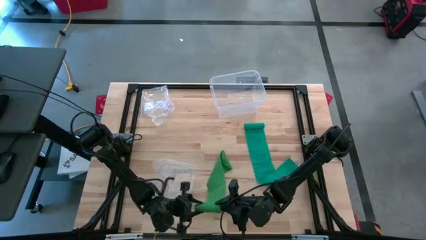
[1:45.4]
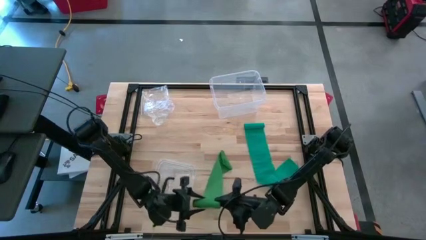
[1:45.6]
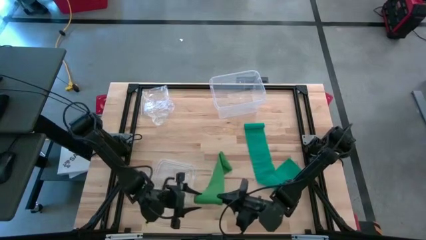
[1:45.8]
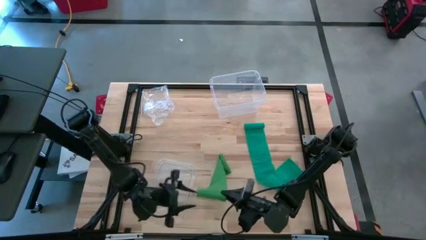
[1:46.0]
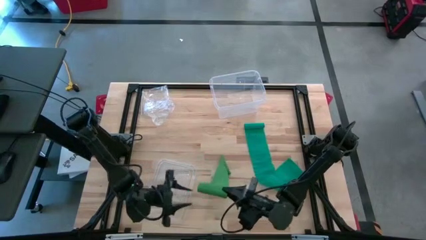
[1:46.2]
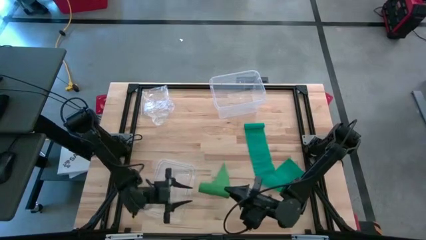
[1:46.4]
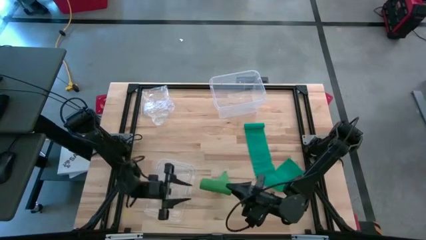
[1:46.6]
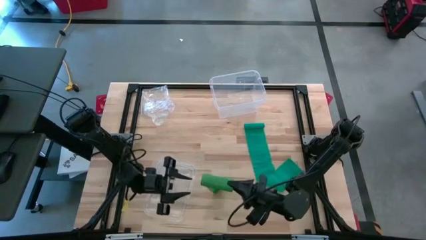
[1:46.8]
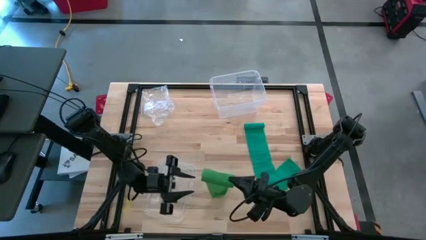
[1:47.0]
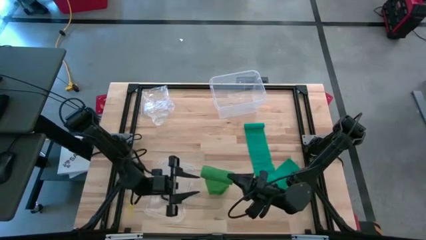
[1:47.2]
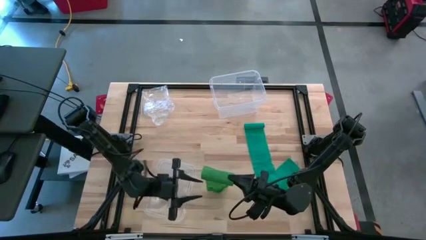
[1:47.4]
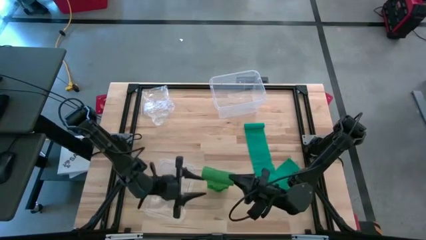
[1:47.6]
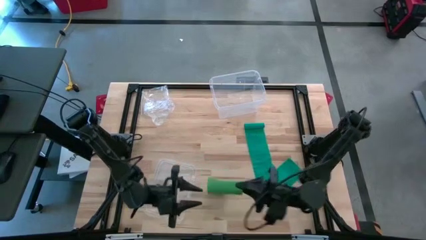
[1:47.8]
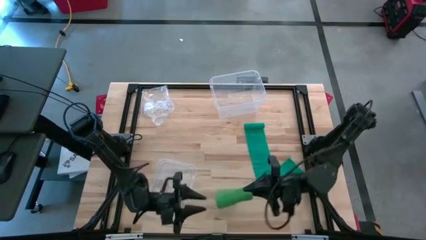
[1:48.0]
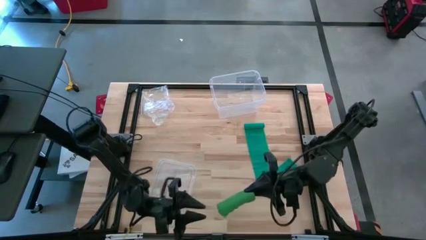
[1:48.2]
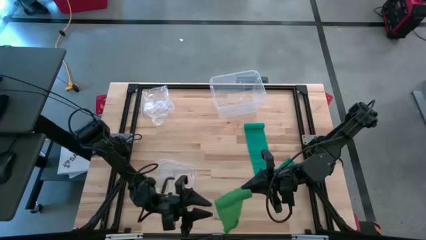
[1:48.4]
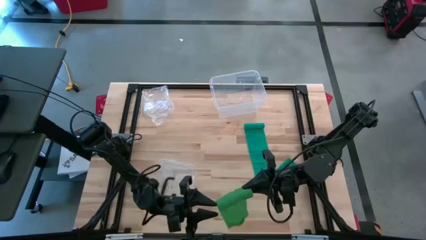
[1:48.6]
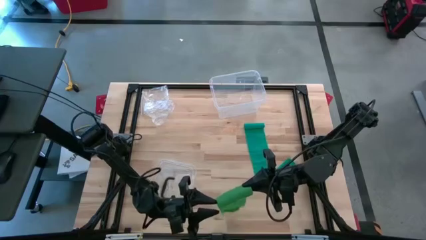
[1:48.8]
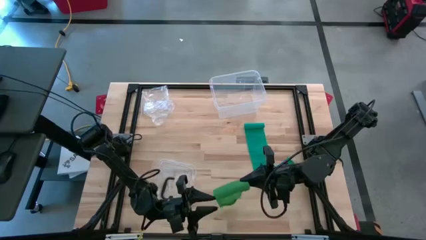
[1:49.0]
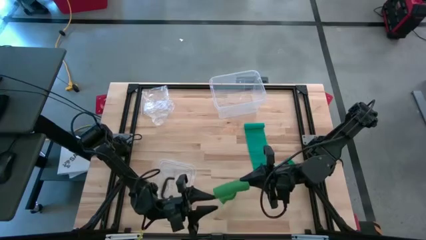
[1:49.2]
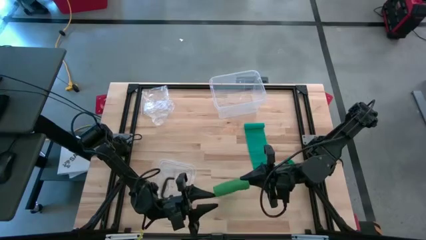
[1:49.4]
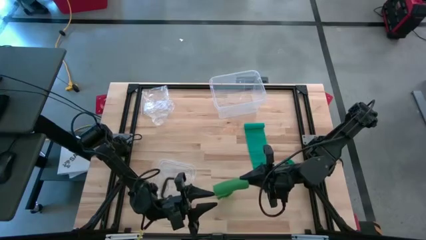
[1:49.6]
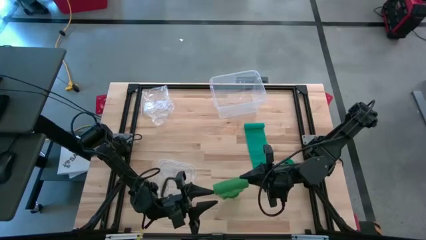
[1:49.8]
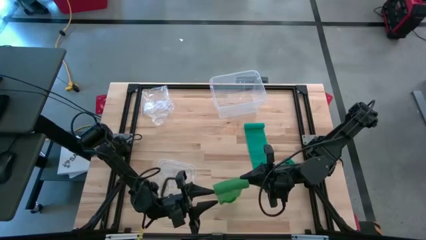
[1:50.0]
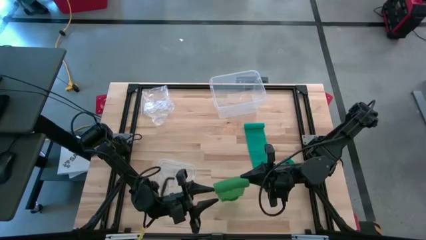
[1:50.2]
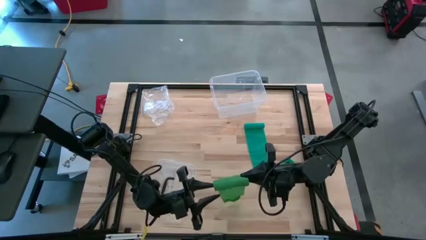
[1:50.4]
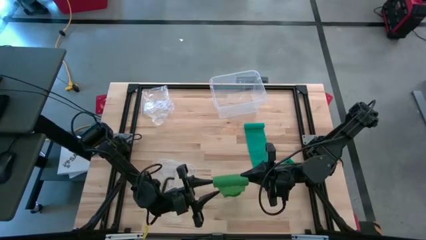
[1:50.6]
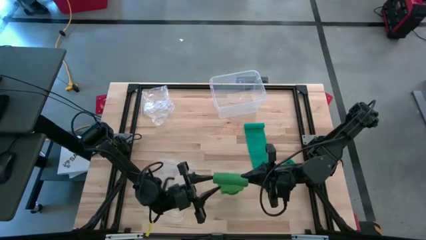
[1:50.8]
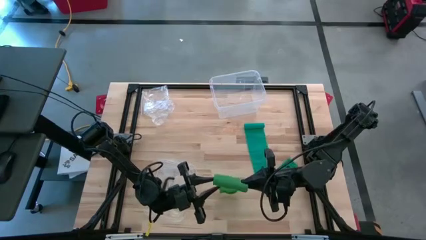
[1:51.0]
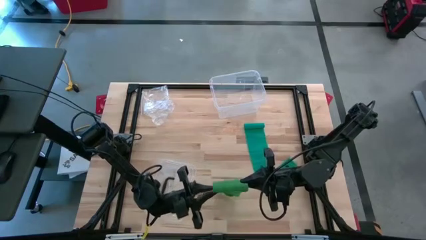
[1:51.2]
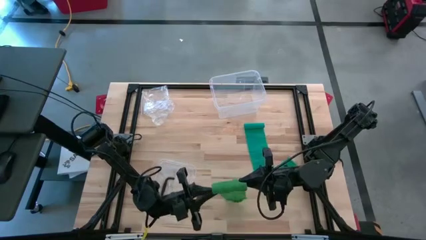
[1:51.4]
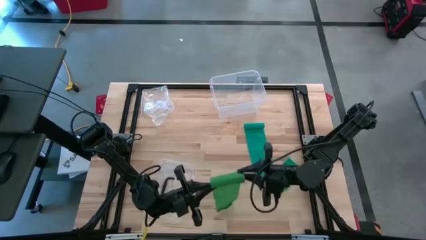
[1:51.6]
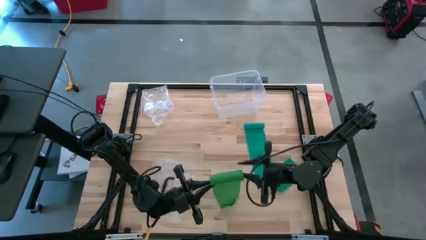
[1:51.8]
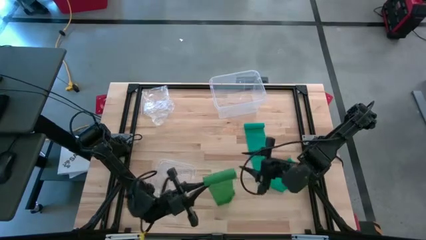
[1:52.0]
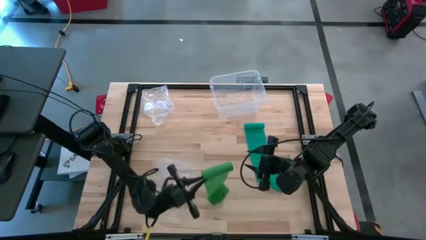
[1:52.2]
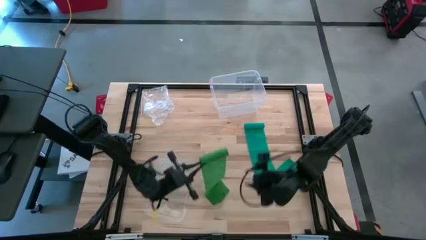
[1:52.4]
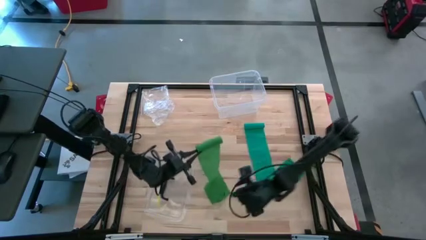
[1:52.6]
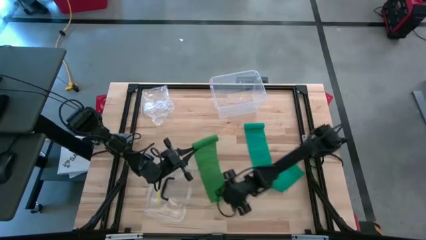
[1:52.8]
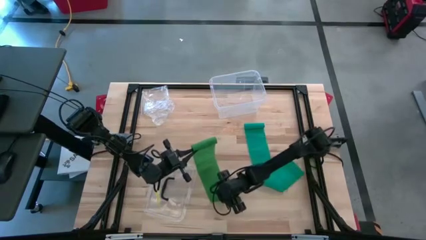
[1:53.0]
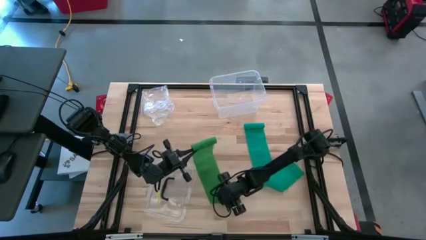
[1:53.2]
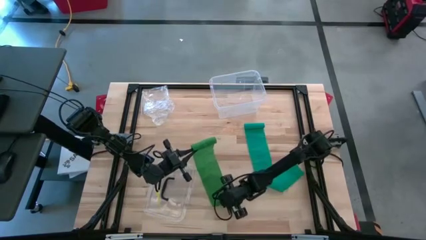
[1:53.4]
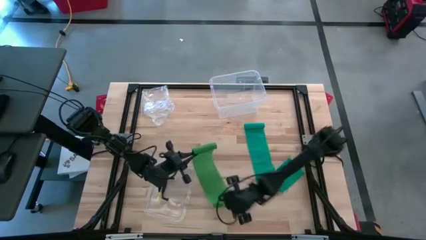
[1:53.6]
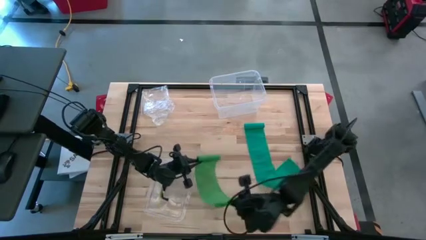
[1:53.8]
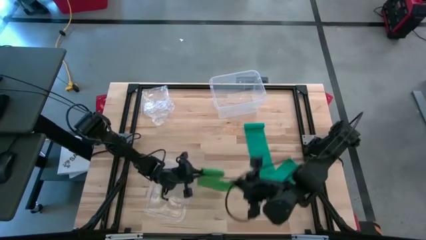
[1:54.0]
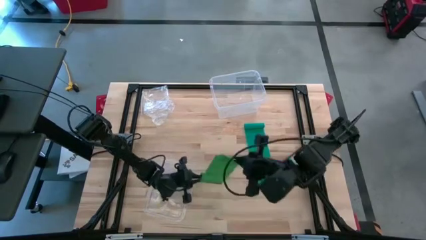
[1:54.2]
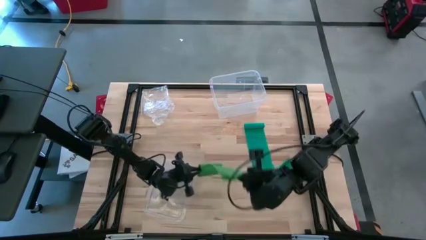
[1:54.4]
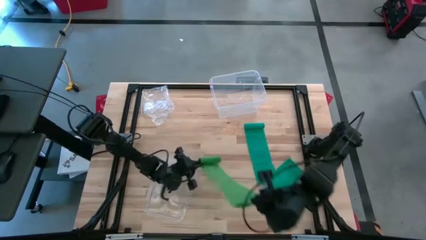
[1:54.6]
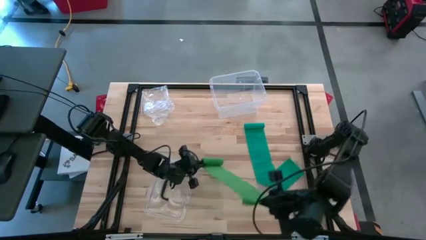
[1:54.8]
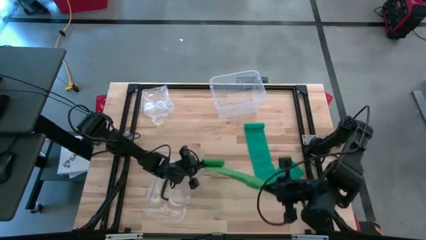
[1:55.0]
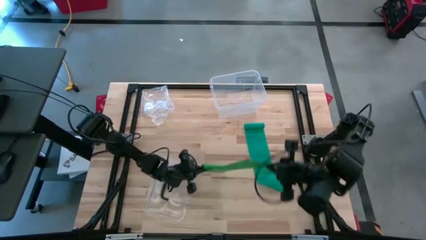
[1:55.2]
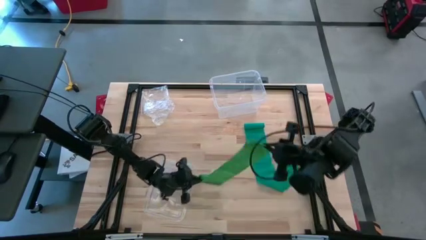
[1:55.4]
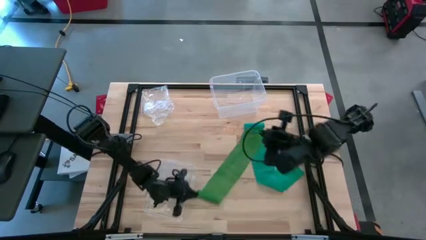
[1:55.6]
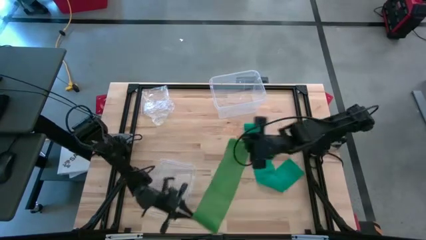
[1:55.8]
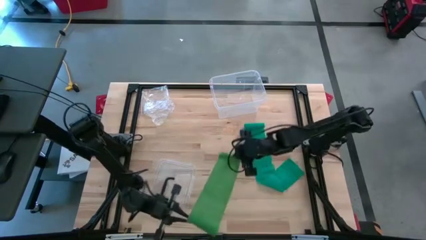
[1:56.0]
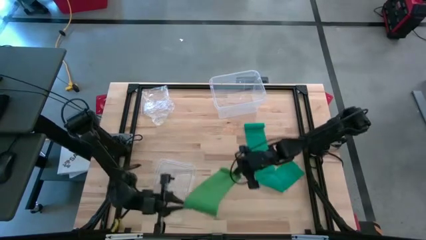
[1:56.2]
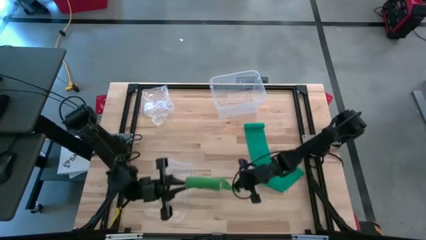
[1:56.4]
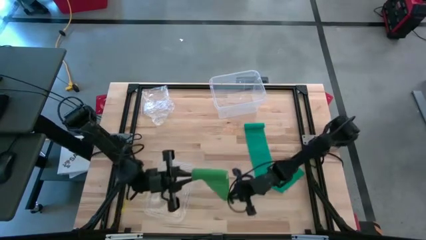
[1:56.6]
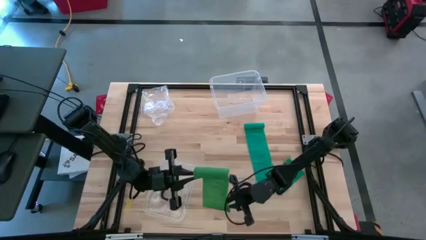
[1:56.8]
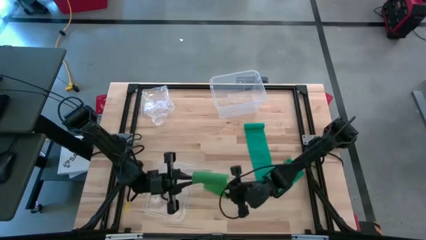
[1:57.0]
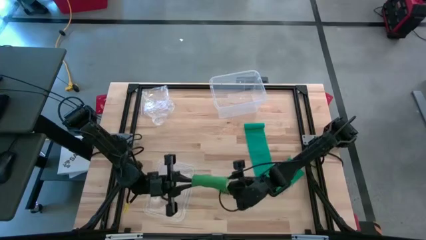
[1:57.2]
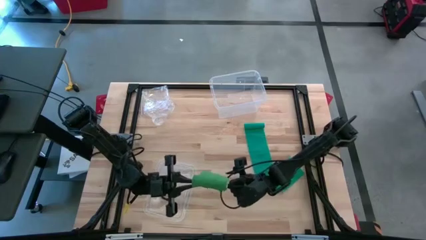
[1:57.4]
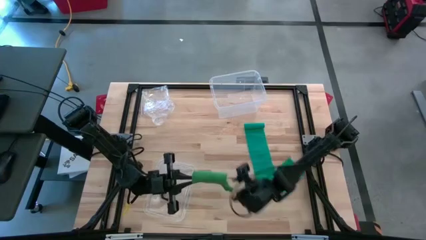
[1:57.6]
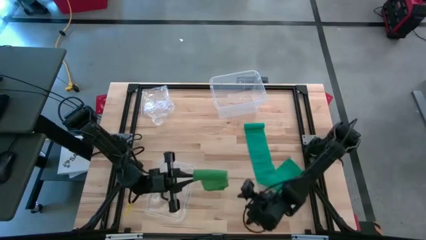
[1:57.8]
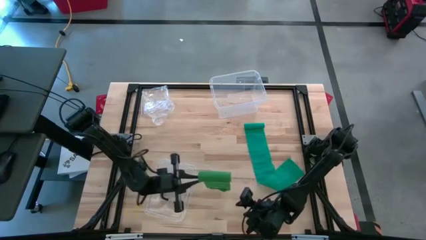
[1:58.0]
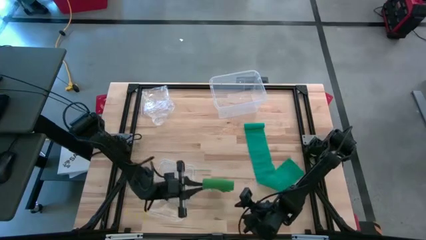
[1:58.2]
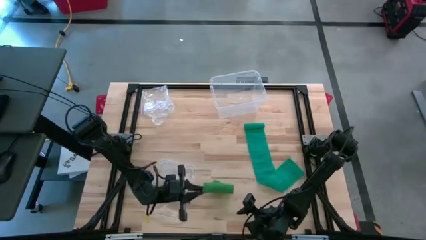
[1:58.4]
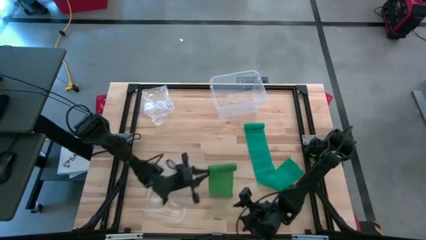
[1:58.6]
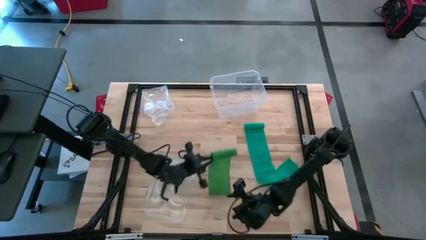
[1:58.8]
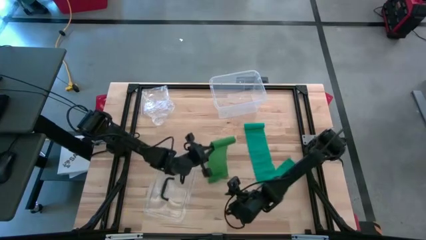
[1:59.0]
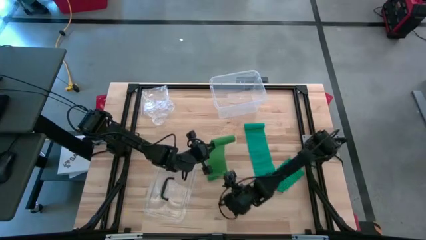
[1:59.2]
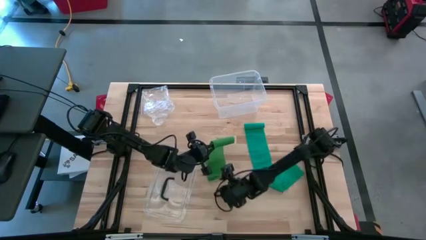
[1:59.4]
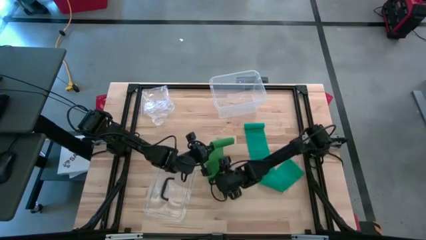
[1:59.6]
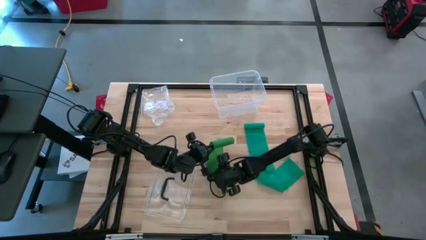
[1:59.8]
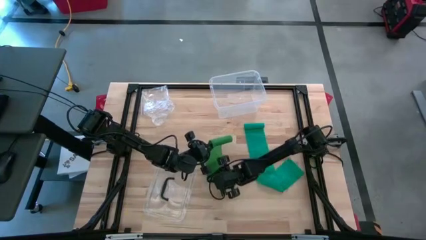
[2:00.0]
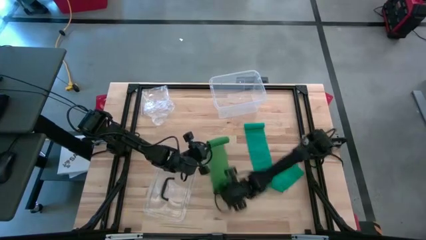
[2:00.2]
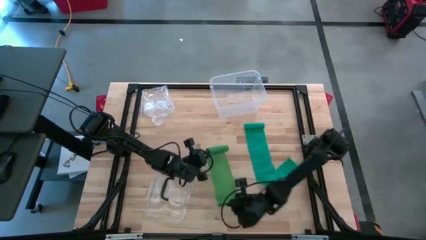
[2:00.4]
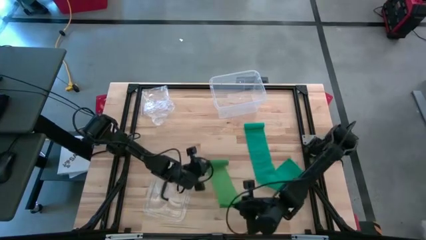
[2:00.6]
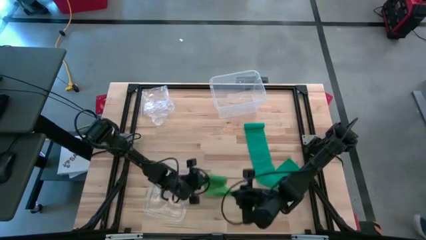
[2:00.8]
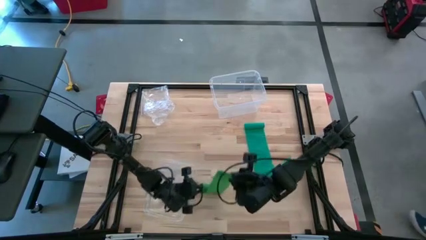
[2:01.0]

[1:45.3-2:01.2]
Task: Roll bandage
Roll the green bandage
